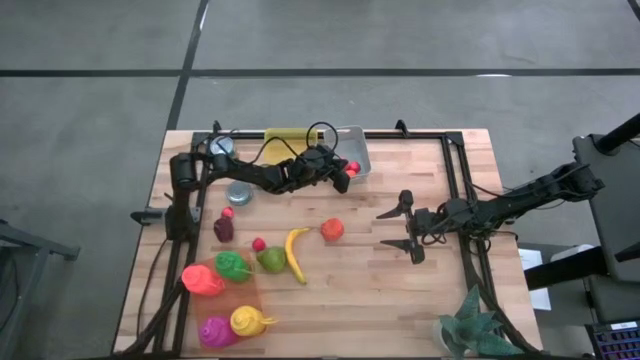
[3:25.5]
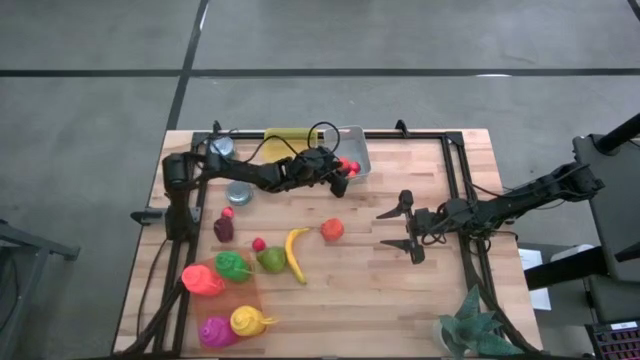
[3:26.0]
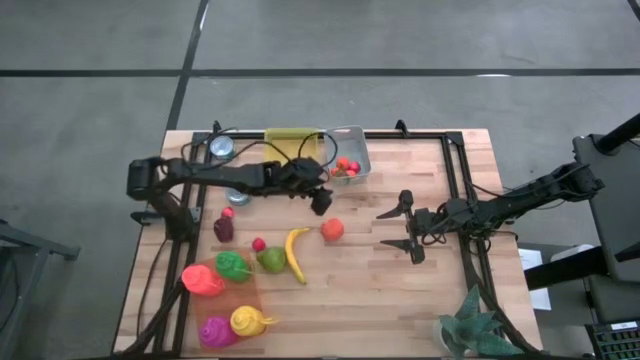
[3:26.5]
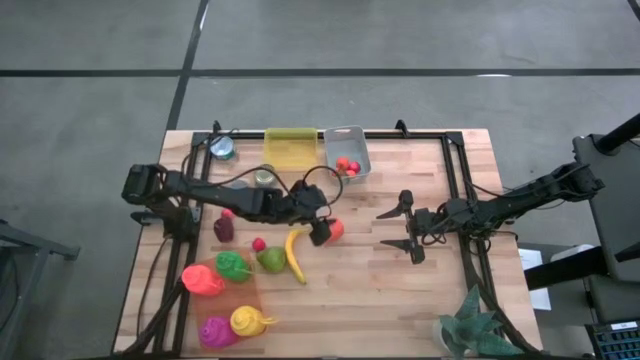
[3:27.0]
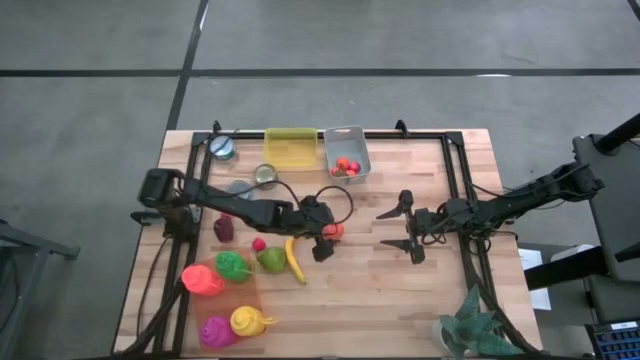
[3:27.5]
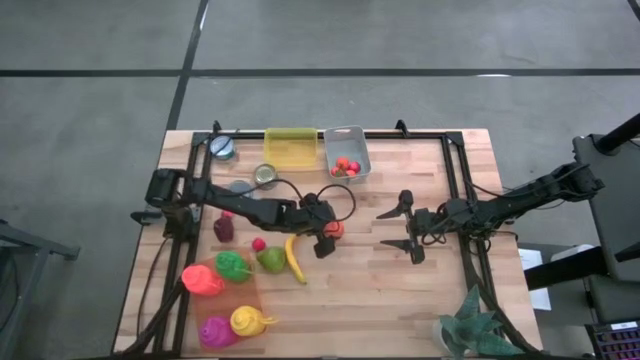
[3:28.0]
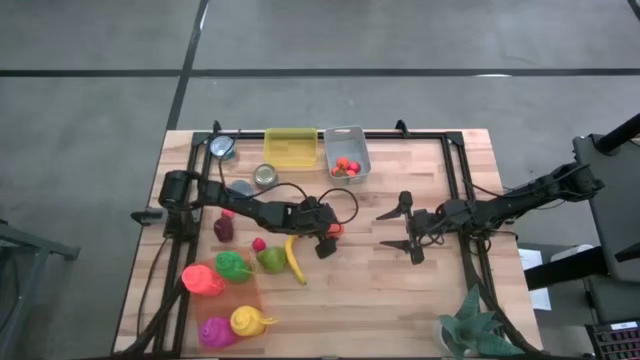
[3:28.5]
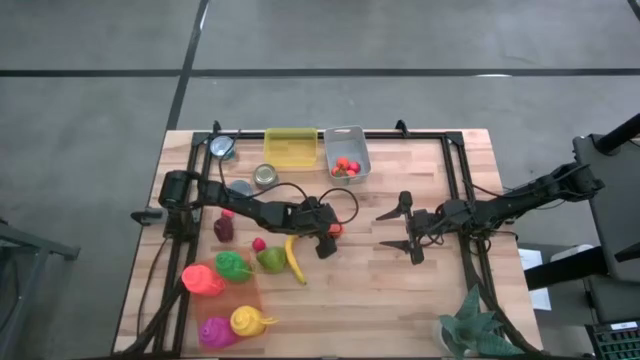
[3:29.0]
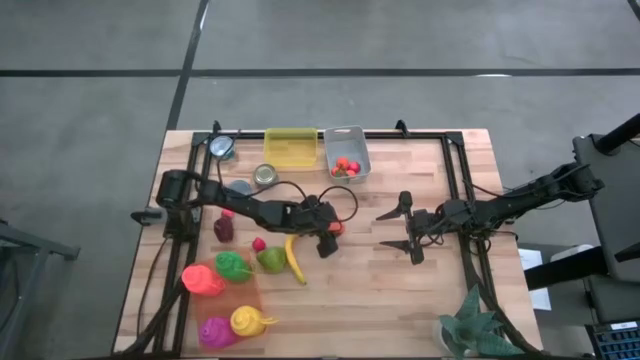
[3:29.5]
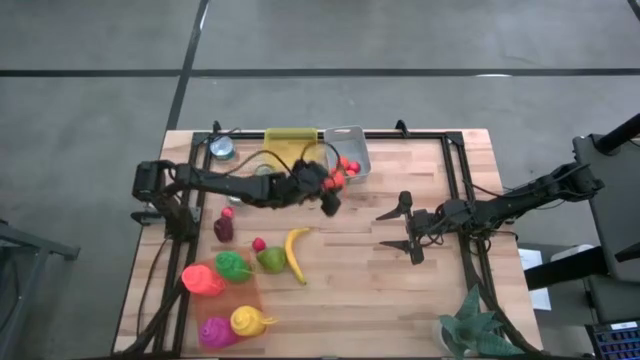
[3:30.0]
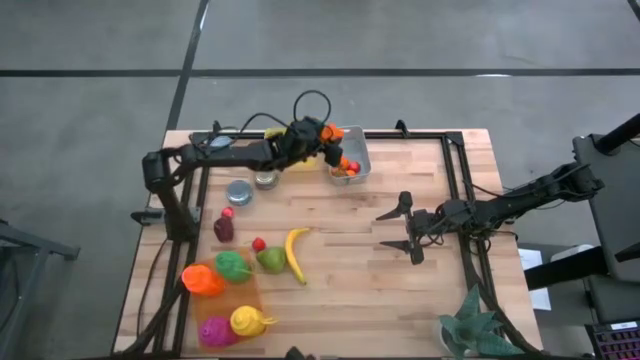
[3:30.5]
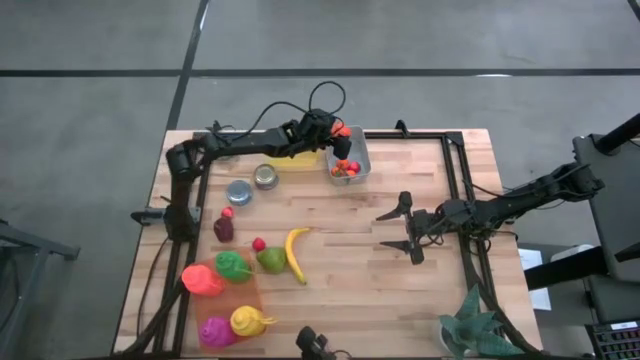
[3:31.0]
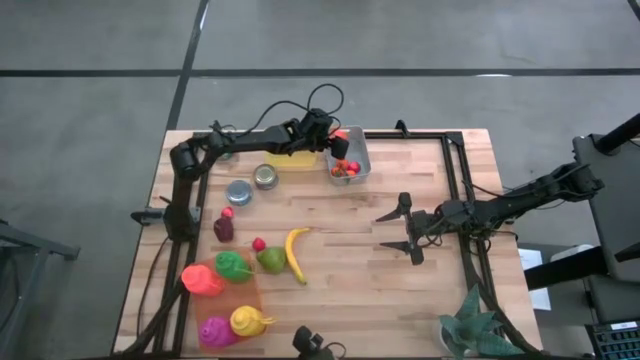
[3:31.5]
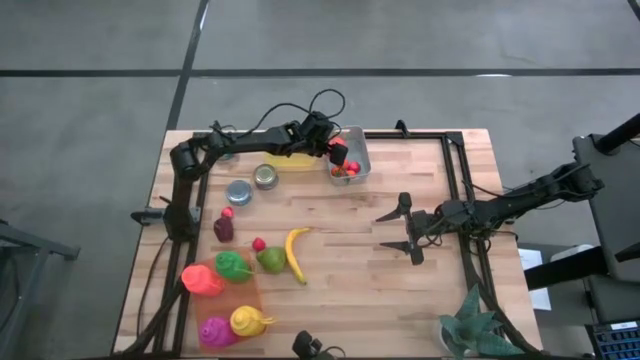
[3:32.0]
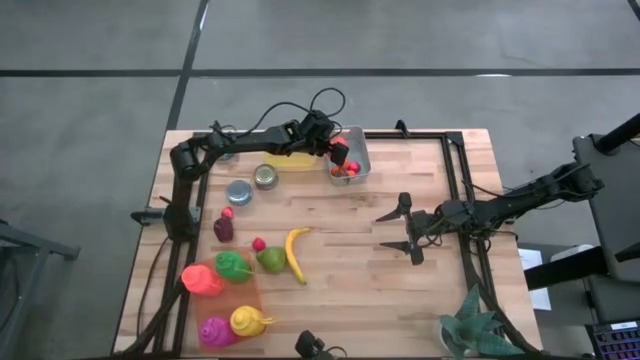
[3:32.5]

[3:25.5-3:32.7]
Task: Pick & Place Food Item
Put the orange into the gray bin

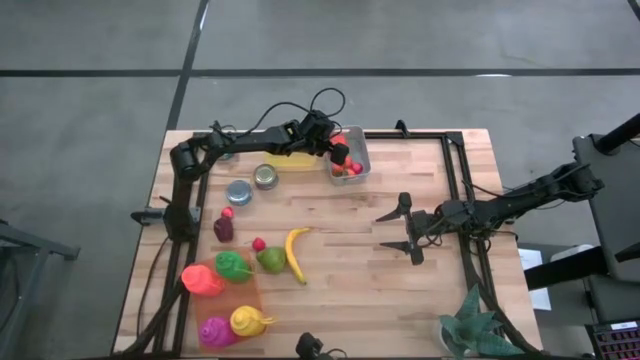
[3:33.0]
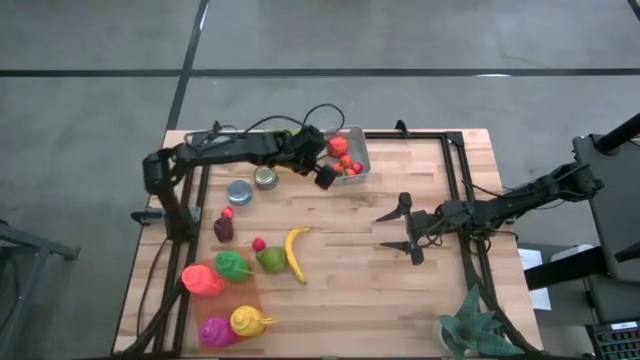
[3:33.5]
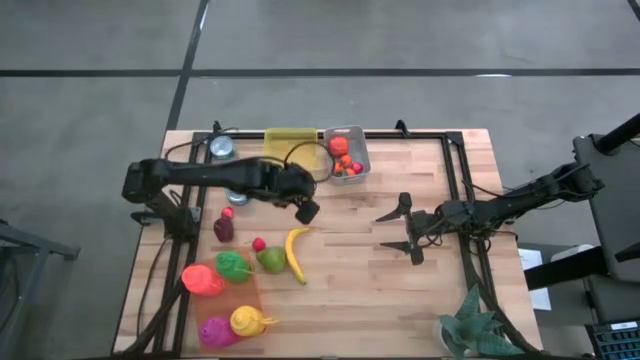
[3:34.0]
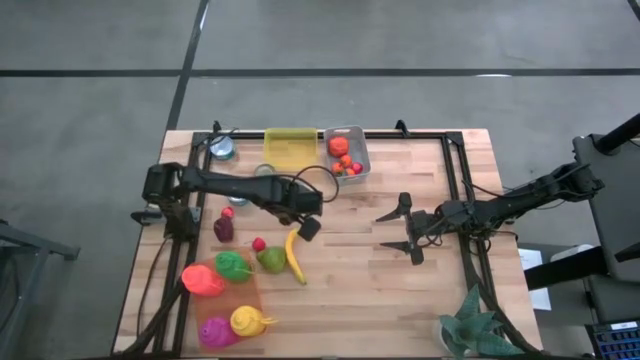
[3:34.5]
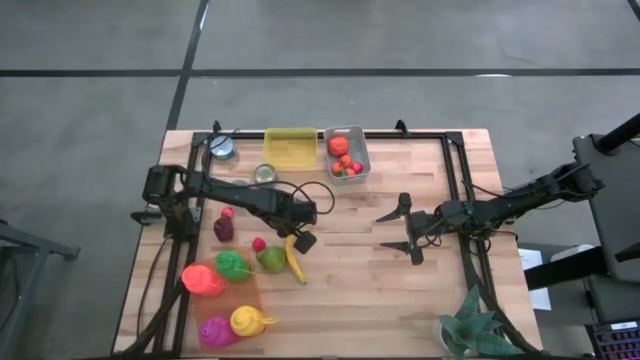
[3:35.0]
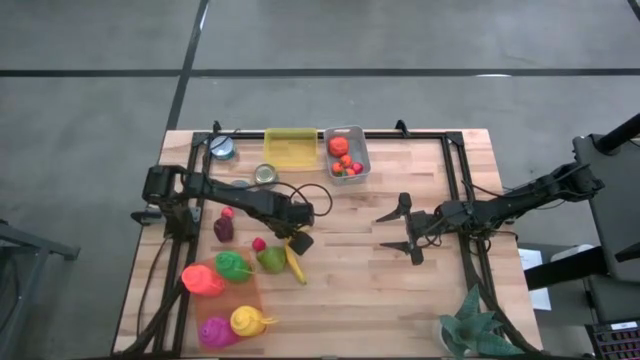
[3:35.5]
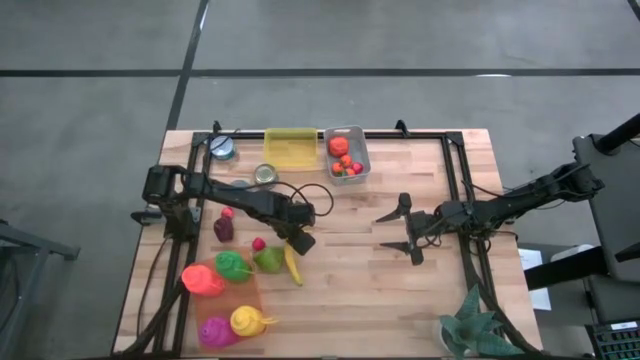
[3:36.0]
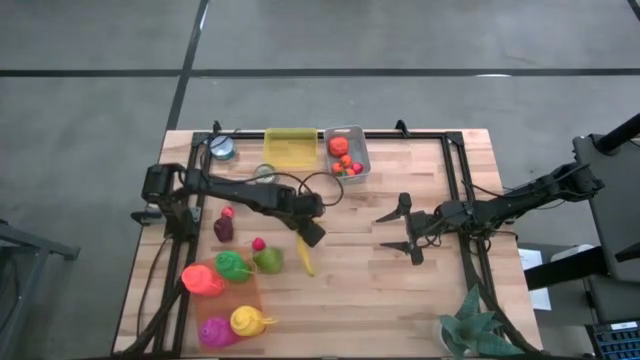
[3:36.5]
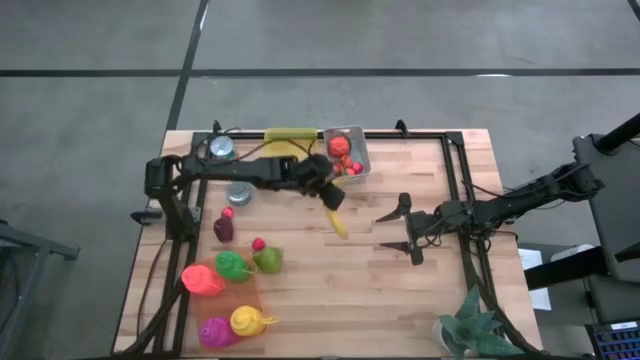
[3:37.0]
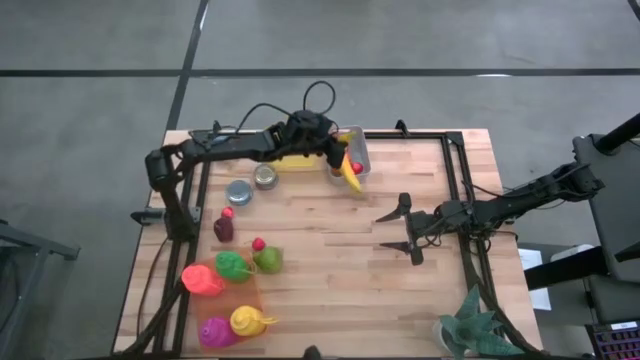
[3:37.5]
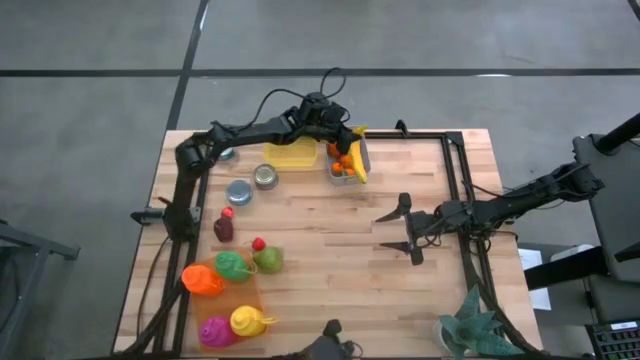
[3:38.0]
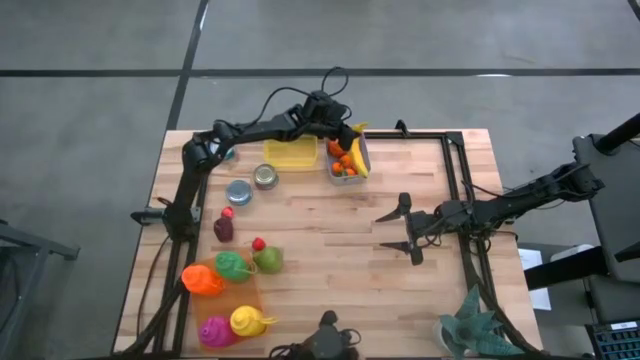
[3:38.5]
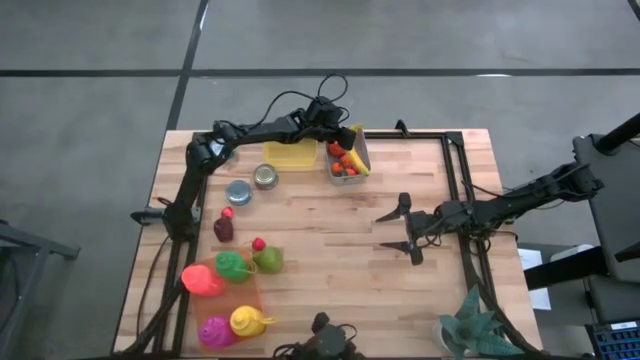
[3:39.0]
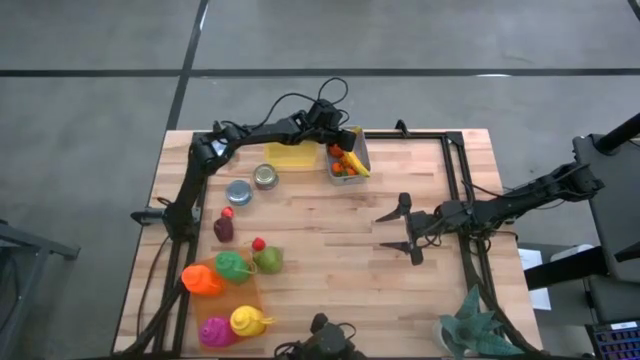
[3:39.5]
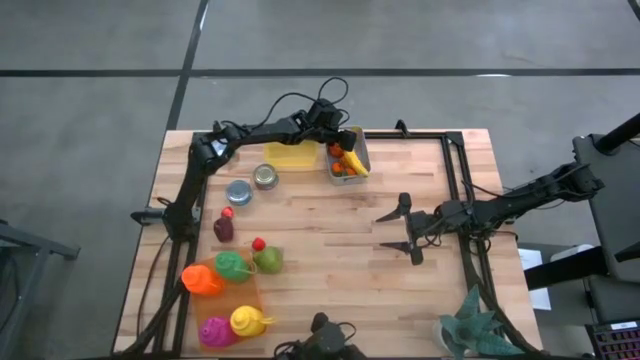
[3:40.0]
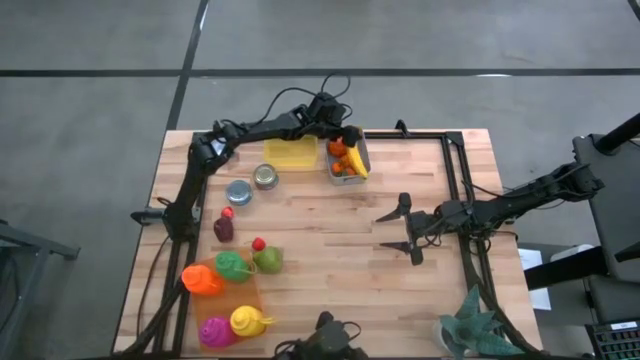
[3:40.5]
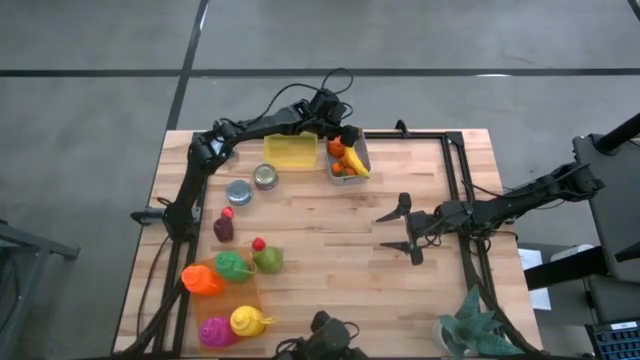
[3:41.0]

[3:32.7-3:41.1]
Put the yellow banana into the gray bin

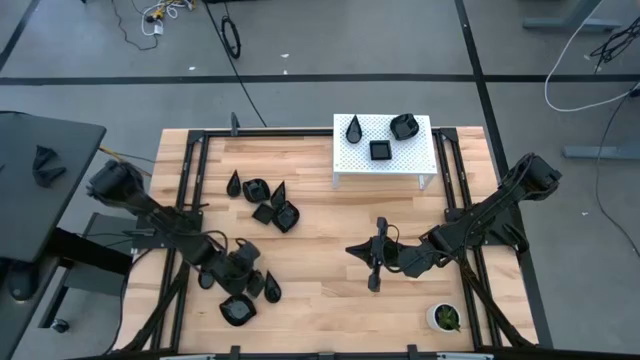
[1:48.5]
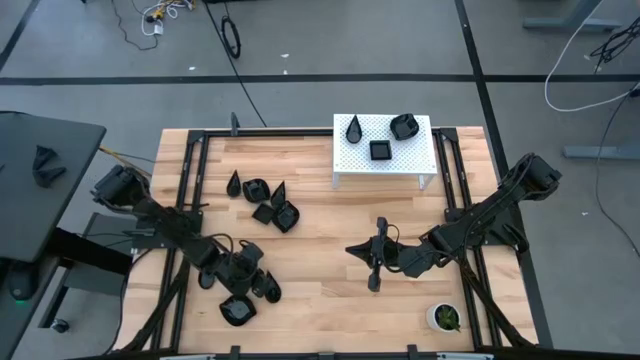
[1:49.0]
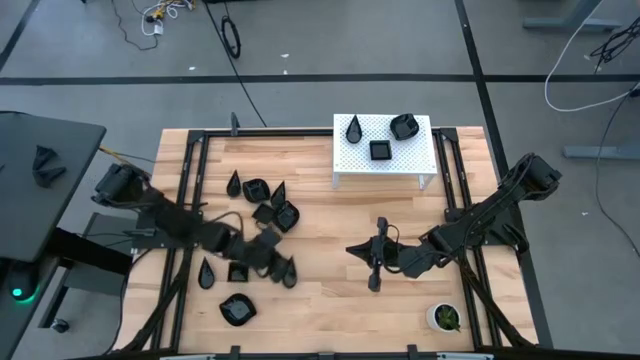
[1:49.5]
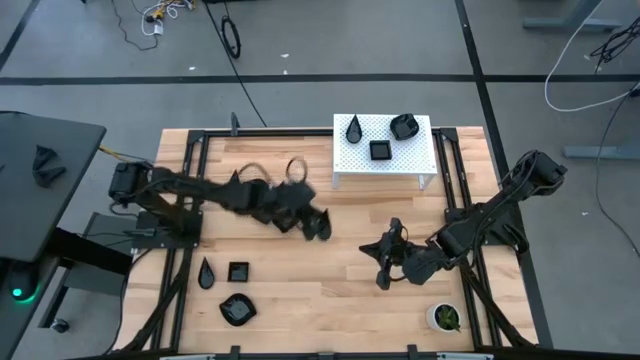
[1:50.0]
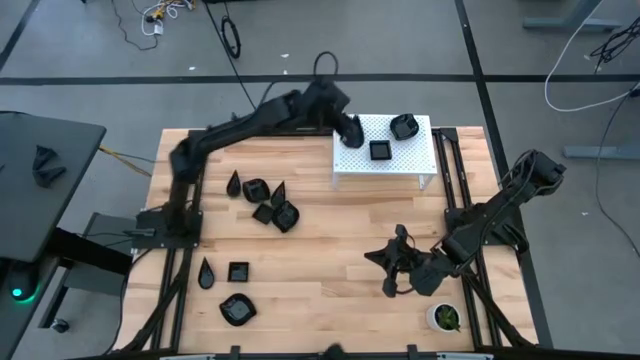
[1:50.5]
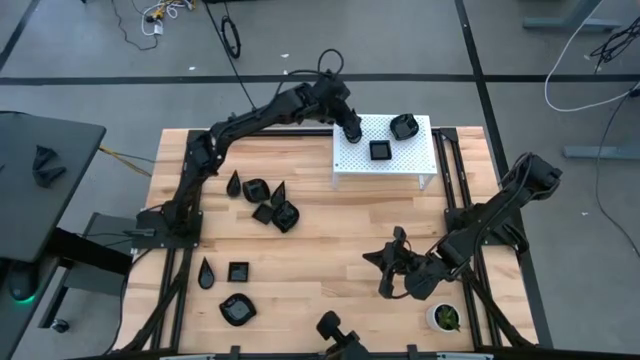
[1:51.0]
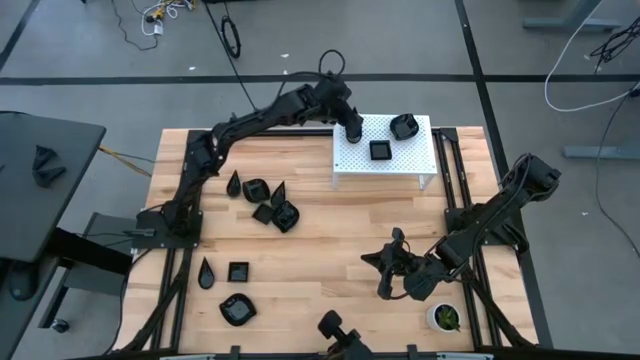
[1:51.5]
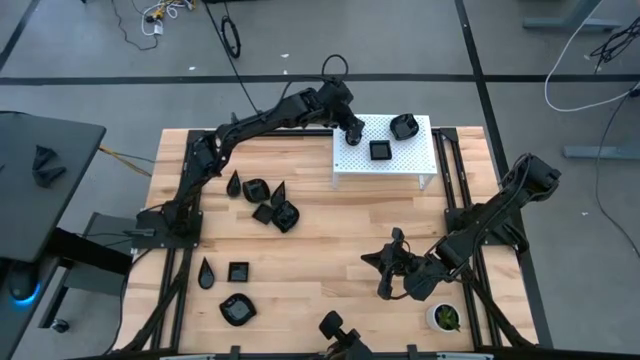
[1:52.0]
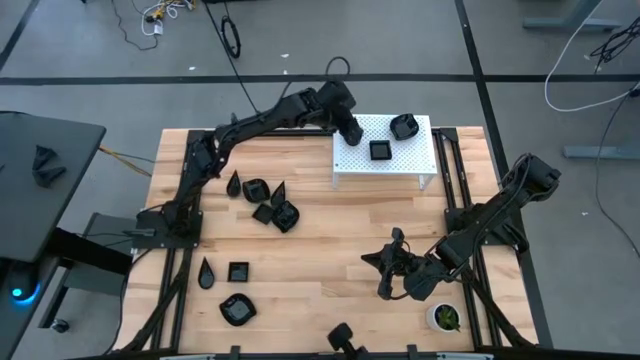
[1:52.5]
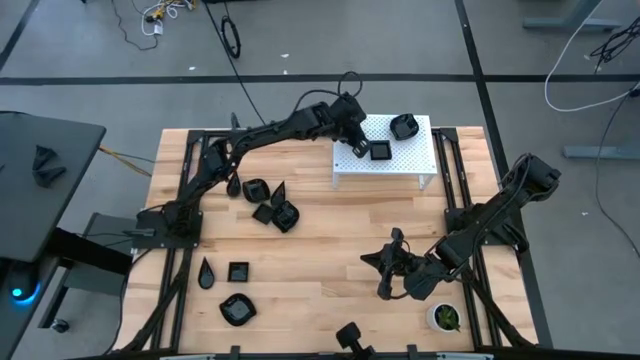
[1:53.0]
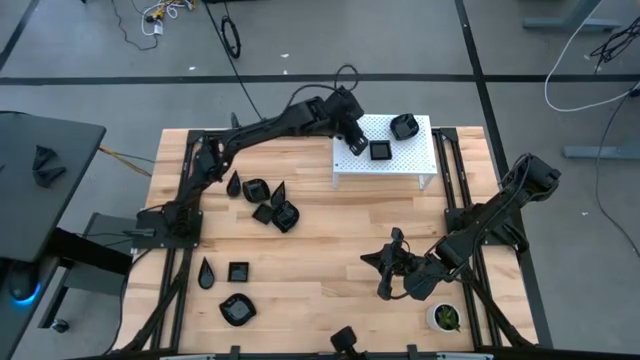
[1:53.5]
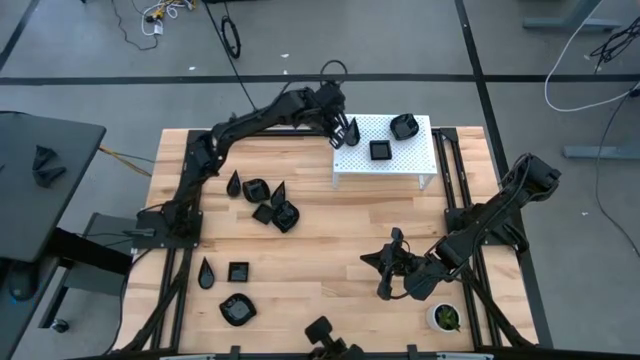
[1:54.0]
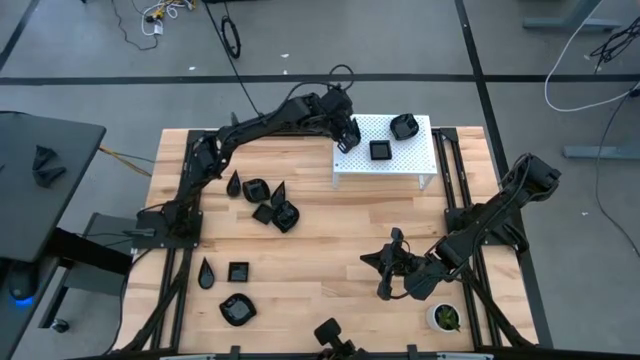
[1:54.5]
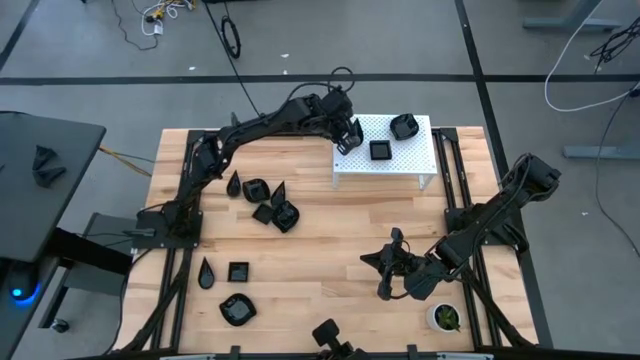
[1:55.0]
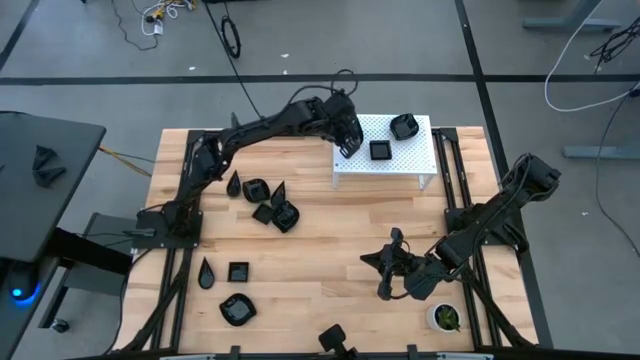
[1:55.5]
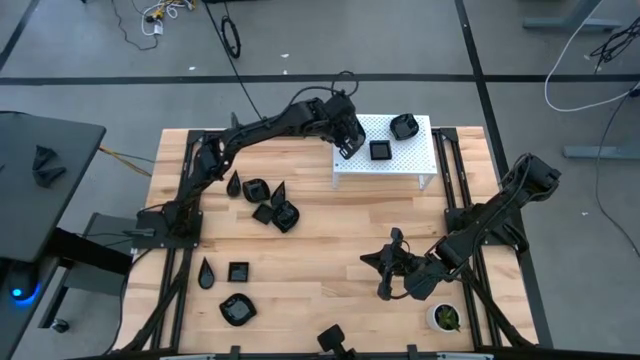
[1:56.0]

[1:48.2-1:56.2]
Task: Pick & Place Mini shaped plates
Stack the black drop shaped plate on the black drop shaped plate on the shelf
